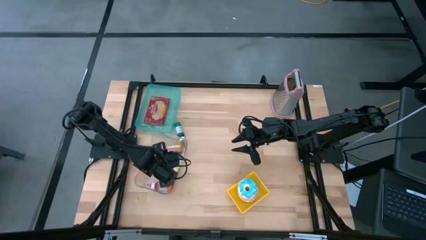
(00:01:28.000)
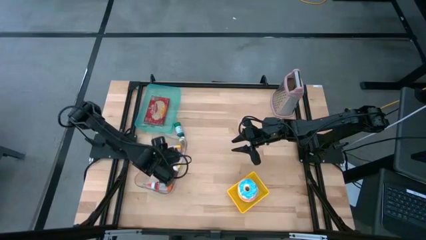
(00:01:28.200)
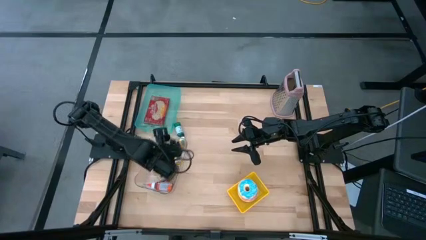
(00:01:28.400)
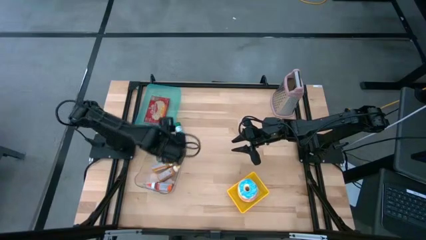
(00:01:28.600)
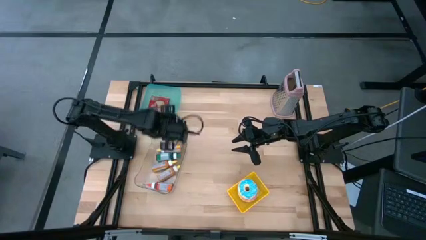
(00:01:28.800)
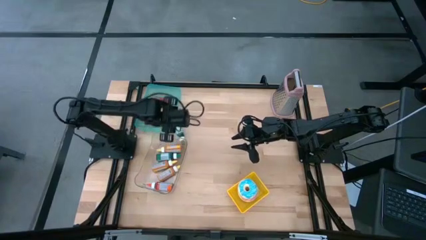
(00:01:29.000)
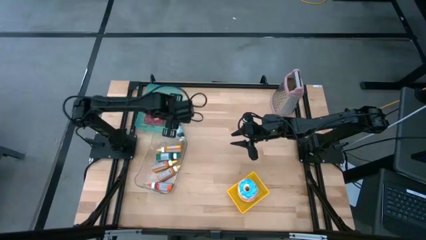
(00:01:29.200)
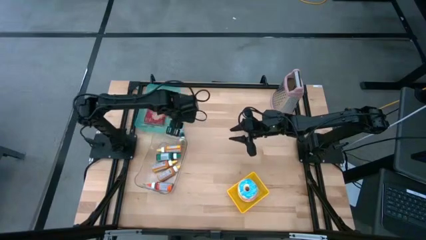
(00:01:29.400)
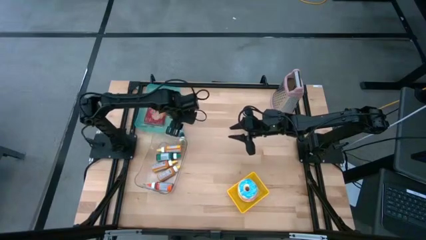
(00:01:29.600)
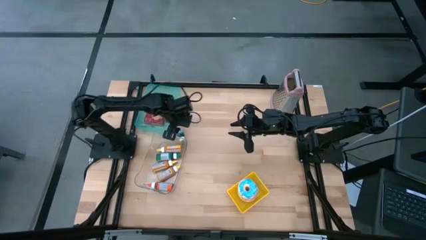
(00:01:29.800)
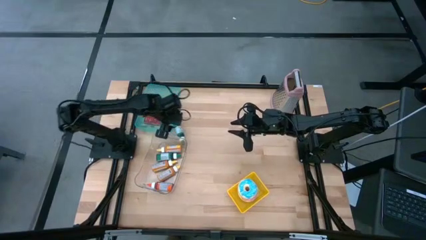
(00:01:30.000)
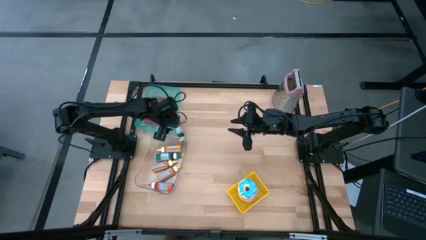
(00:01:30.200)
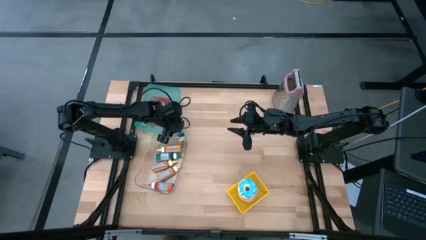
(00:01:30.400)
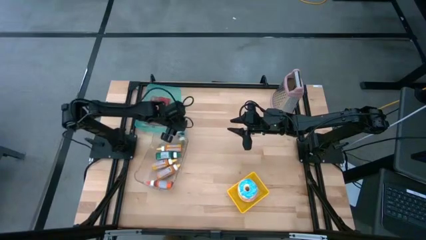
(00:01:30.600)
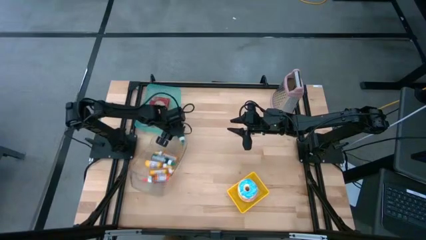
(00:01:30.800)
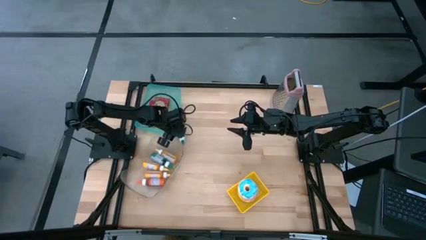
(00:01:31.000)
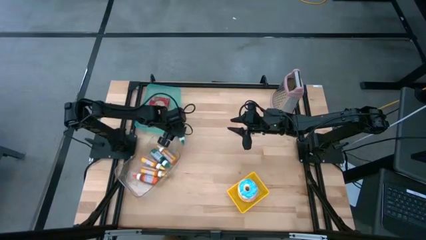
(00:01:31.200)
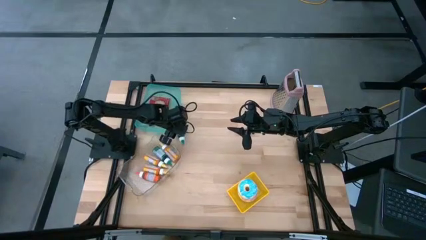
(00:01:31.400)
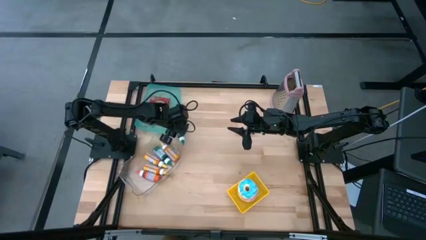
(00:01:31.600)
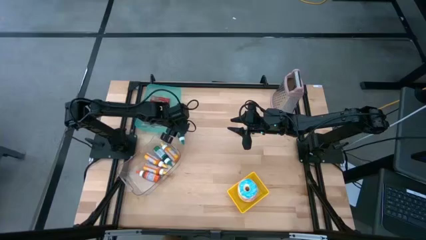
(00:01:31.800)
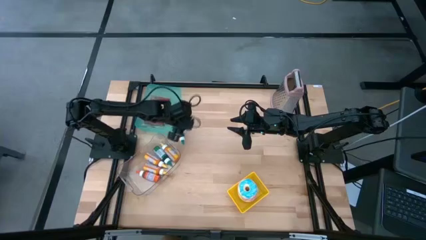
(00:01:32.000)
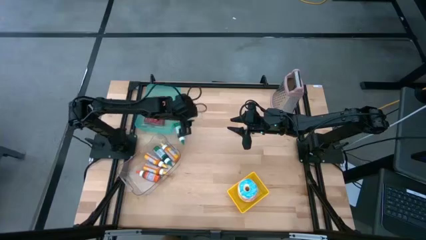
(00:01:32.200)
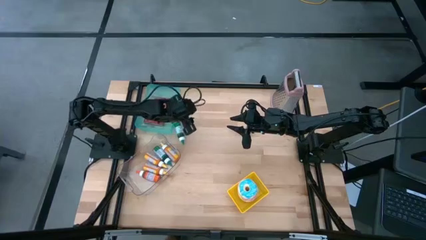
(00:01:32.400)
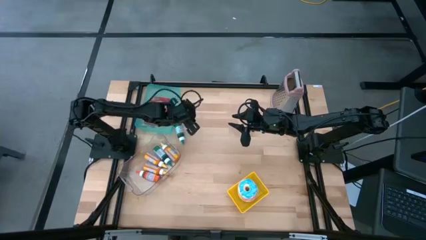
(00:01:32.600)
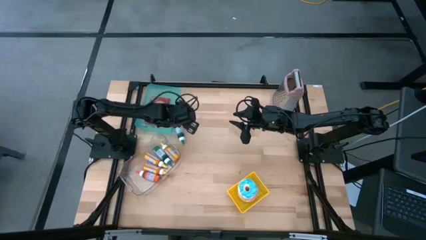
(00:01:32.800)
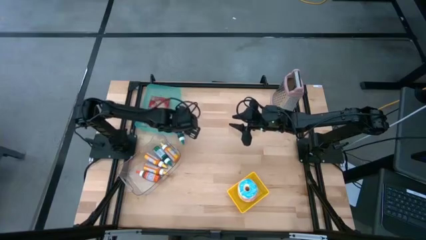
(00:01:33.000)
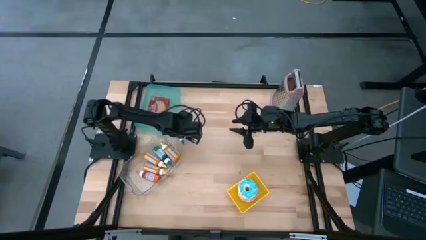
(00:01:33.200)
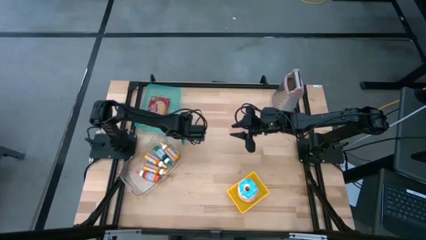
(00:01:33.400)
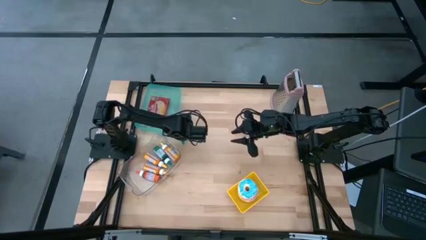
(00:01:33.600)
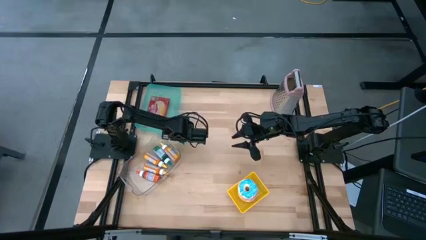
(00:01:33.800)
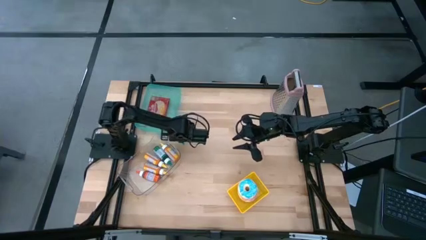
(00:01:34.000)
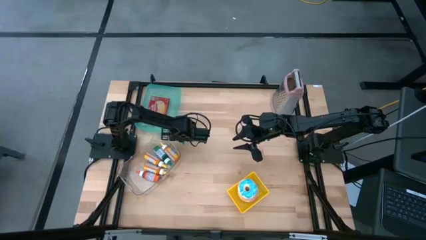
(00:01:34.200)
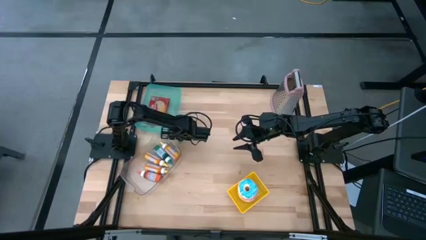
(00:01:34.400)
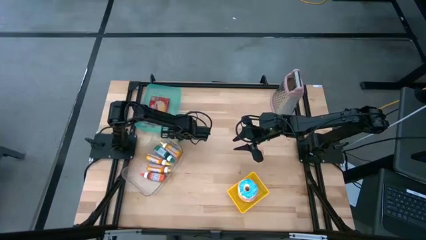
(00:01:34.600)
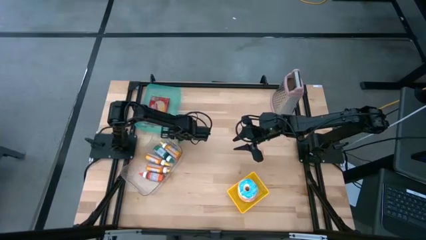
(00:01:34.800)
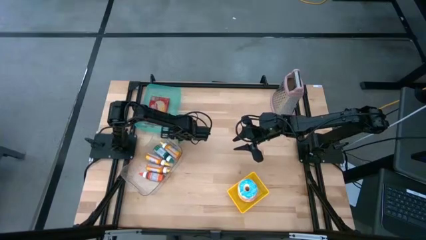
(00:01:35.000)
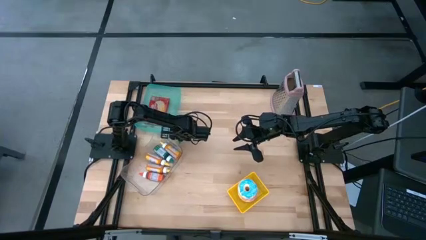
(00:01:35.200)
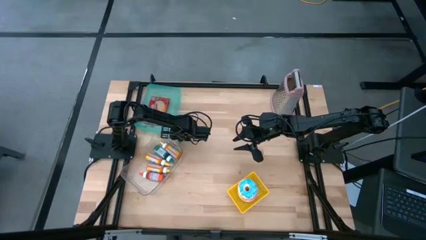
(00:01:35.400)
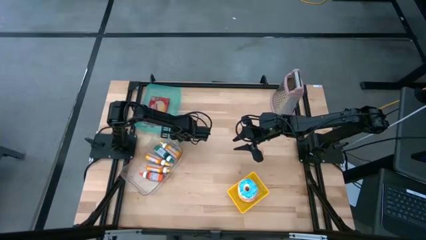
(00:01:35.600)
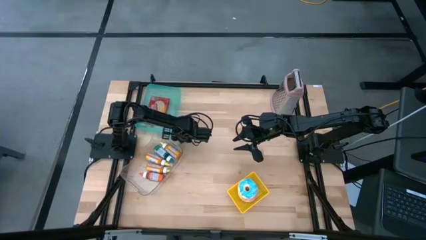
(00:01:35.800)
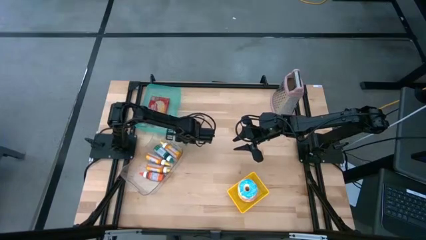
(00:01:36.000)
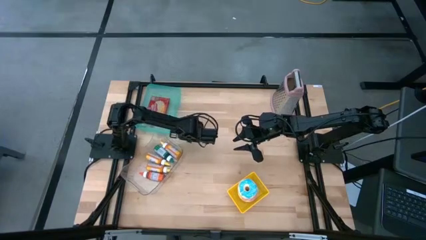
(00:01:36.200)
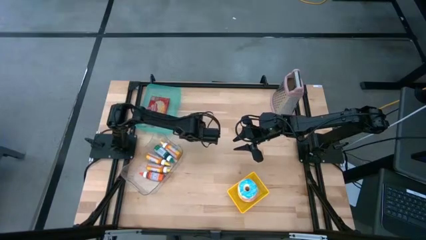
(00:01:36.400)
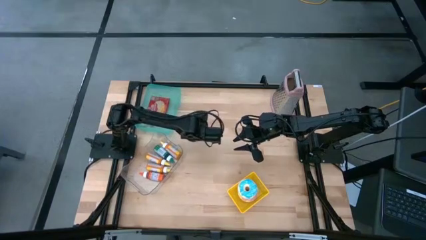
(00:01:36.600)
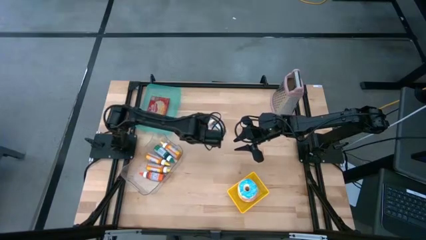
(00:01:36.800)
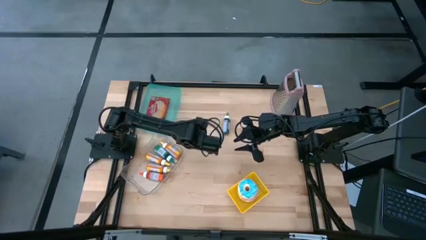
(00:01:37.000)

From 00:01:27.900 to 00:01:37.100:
Put the green food coloring bottle into the transparent bin

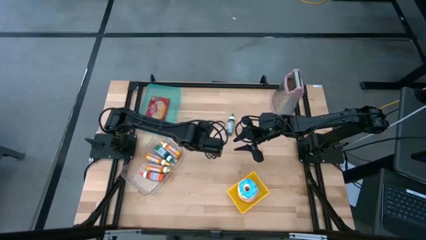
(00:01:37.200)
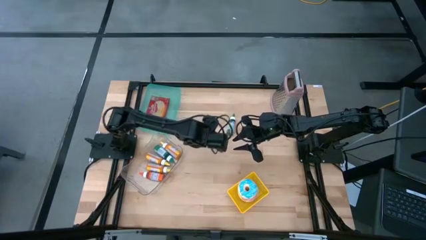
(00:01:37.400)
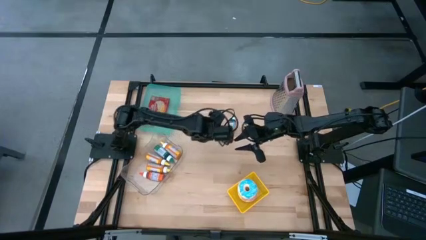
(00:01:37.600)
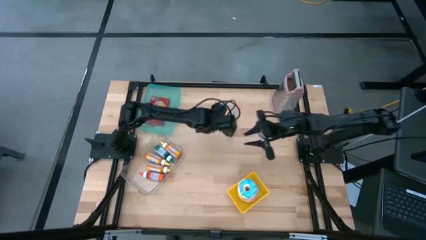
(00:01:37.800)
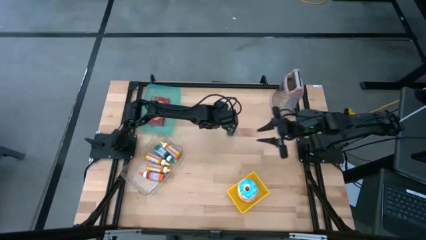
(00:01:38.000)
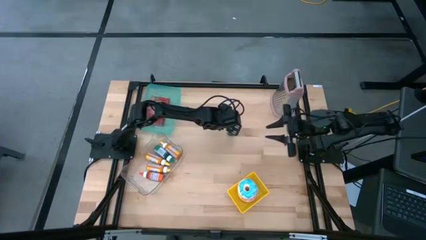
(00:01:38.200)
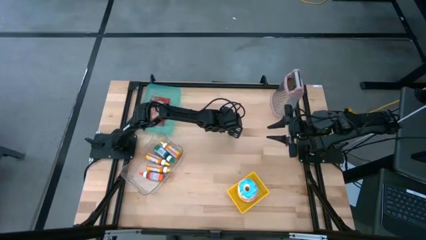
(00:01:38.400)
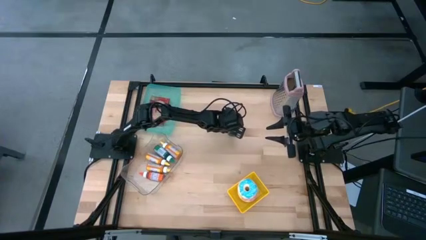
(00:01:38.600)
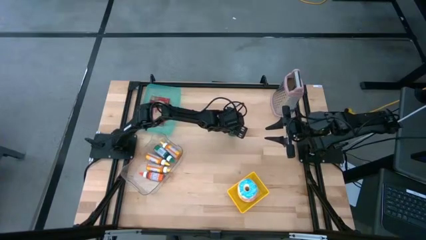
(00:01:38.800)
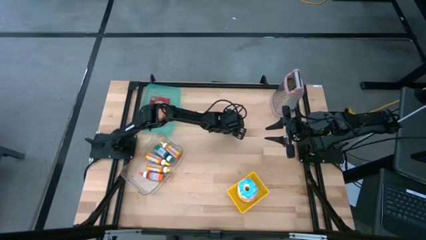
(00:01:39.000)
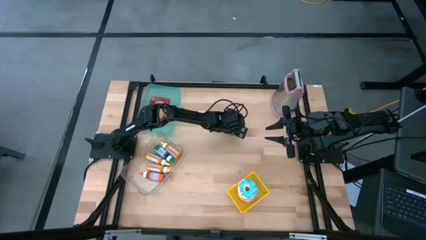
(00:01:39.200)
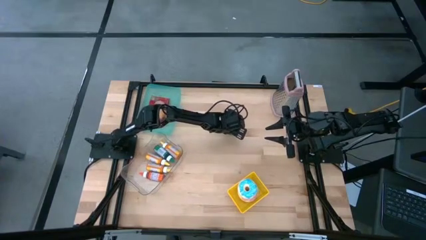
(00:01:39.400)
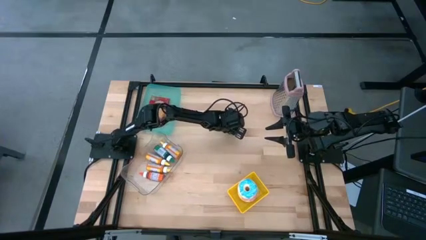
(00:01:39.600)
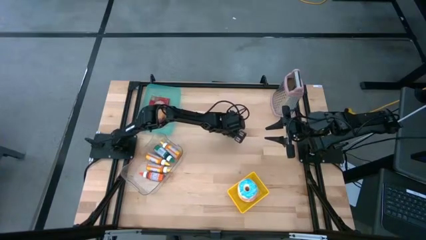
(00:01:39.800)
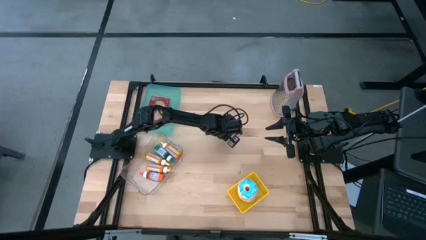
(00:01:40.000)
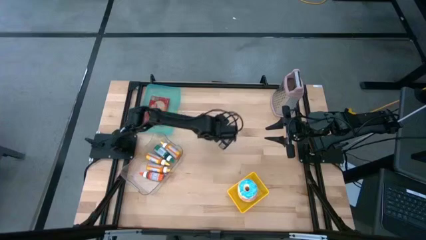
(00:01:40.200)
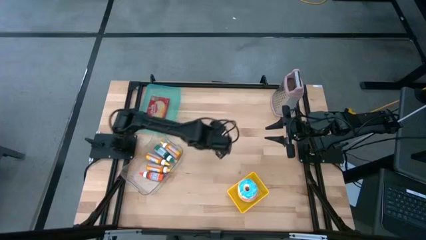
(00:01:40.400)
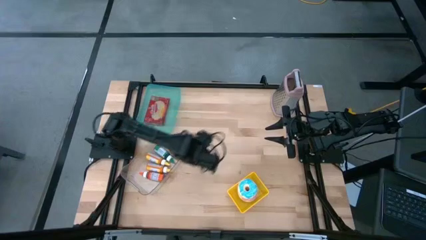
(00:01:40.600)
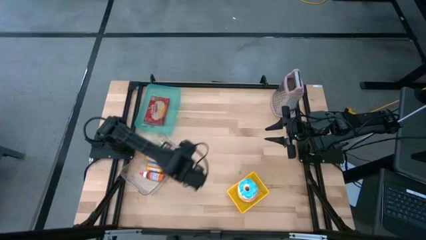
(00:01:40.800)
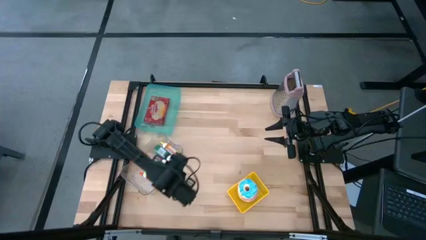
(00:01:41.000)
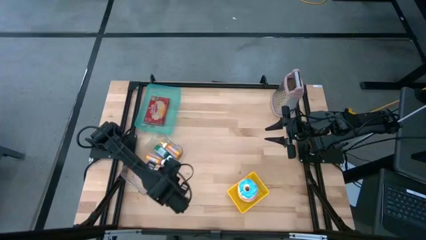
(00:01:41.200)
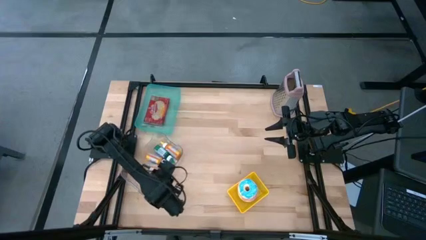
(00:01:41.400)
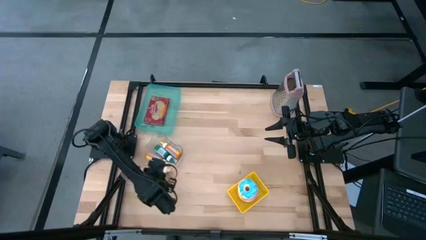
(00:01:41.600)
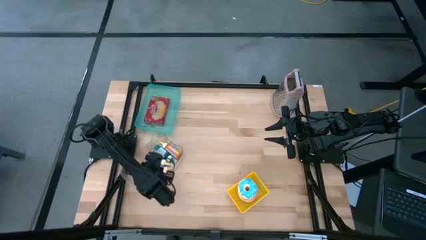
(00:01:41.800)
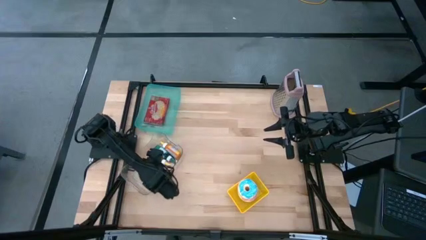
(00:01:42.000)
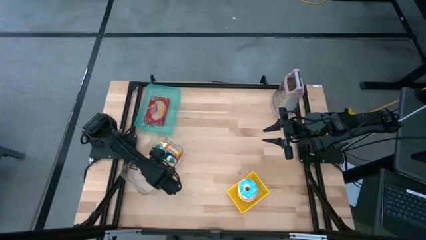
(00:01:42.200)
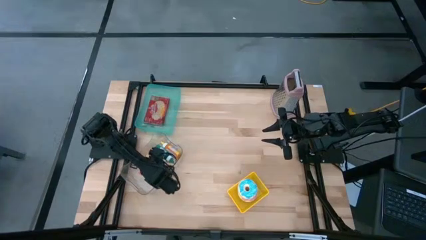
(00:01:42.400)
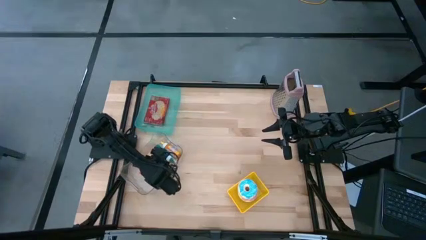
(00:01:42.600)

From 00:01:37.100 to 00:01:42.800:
Put the green food coloring bottle into the transparent bin
